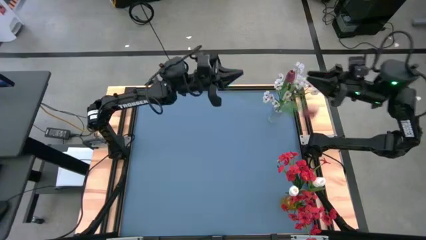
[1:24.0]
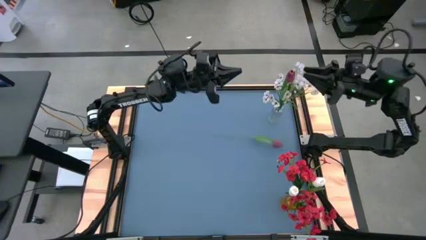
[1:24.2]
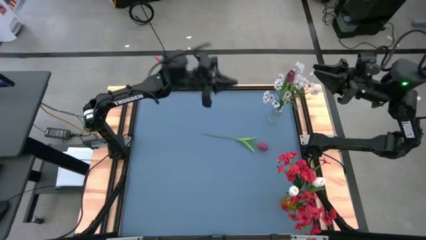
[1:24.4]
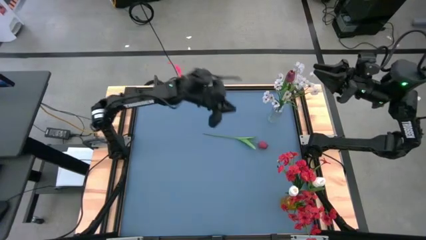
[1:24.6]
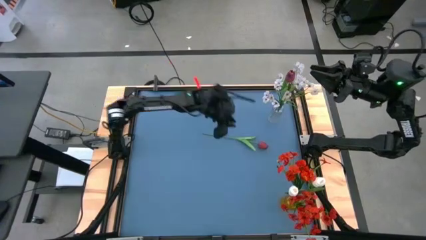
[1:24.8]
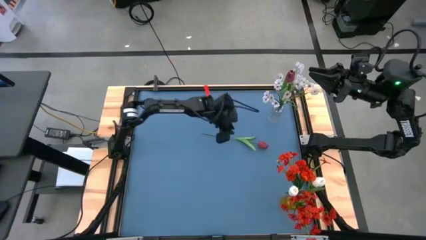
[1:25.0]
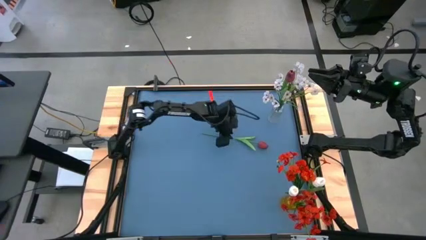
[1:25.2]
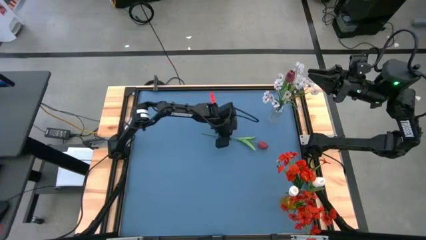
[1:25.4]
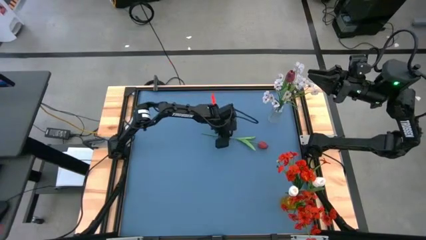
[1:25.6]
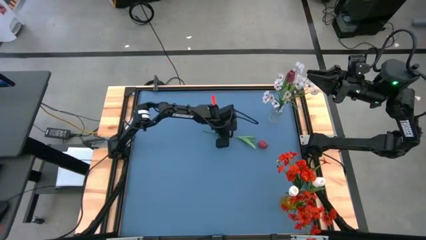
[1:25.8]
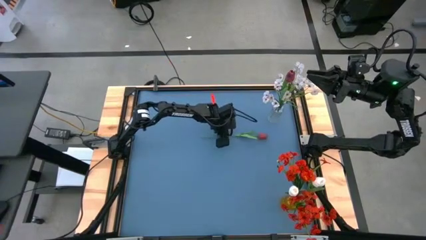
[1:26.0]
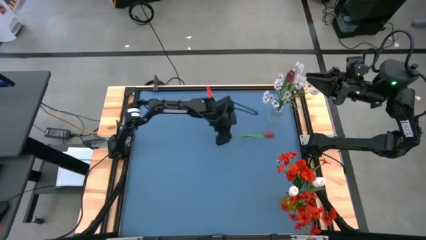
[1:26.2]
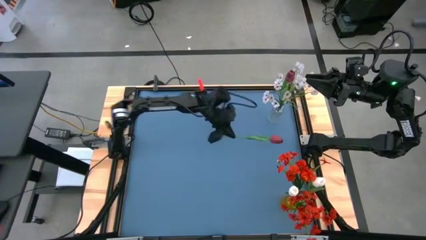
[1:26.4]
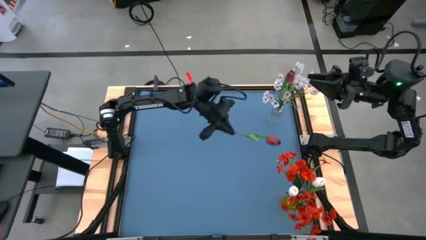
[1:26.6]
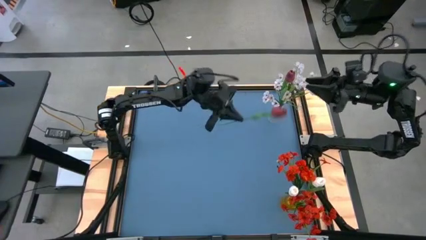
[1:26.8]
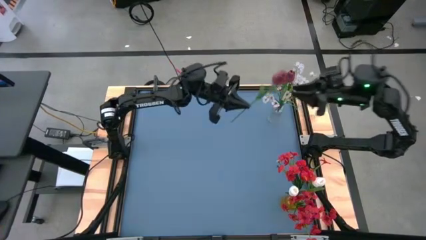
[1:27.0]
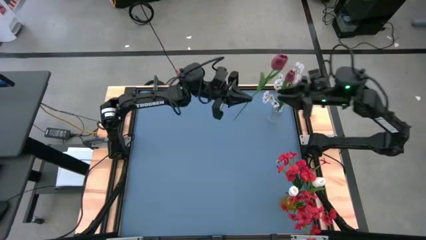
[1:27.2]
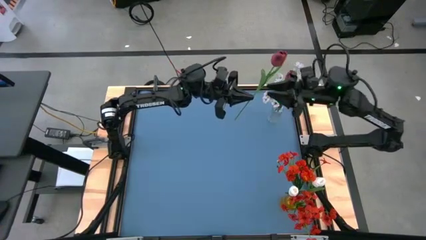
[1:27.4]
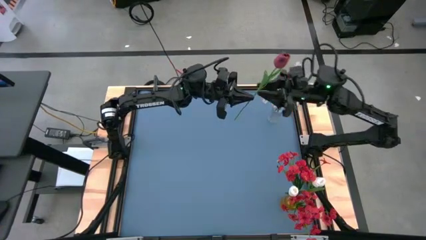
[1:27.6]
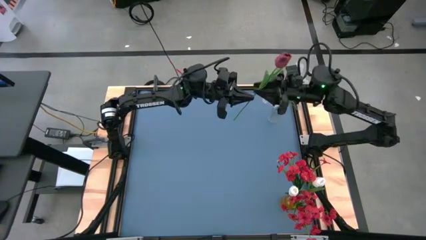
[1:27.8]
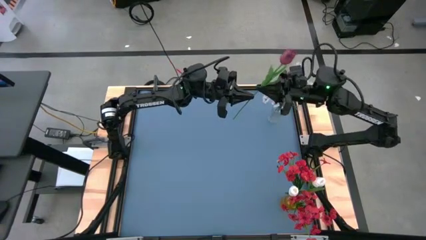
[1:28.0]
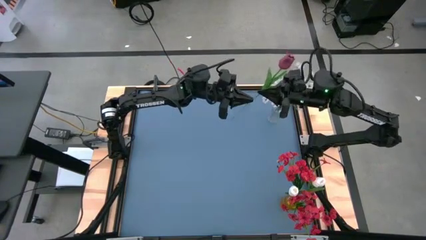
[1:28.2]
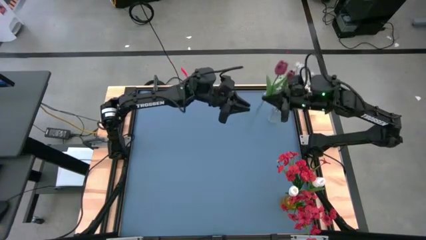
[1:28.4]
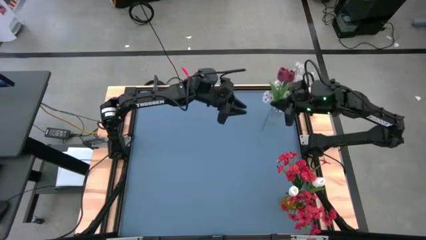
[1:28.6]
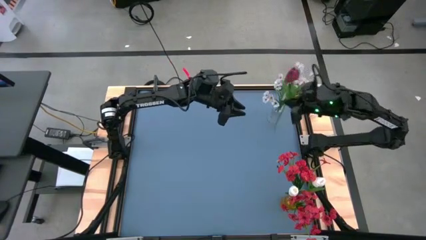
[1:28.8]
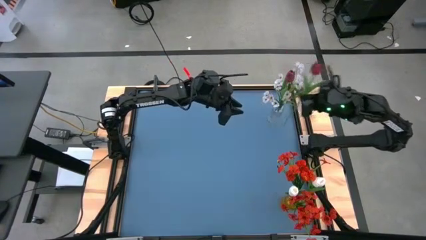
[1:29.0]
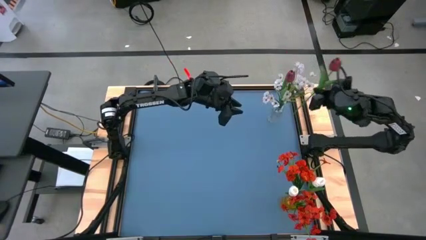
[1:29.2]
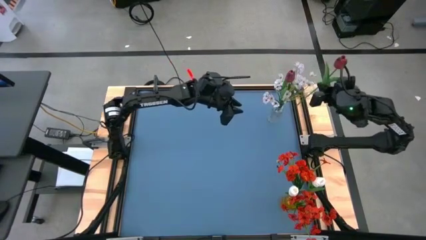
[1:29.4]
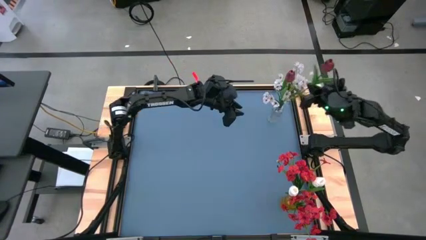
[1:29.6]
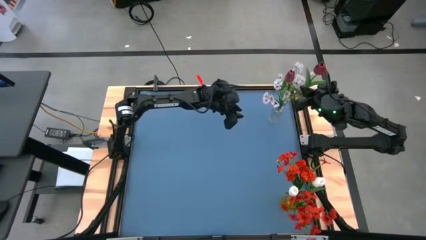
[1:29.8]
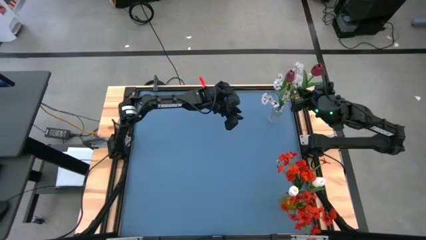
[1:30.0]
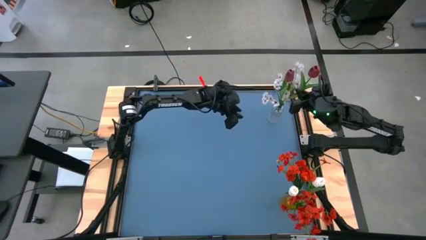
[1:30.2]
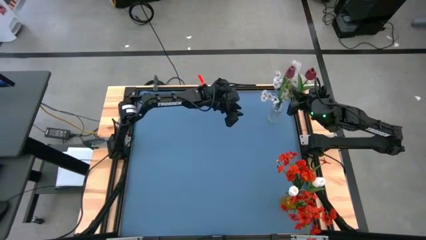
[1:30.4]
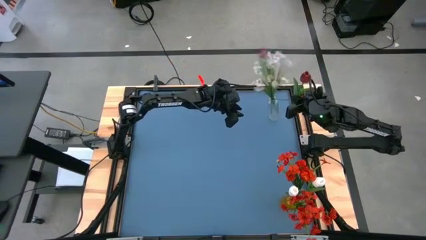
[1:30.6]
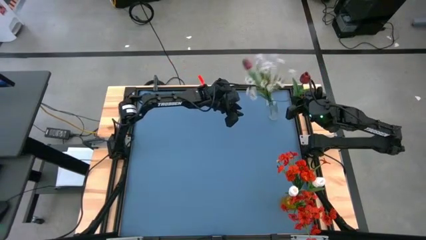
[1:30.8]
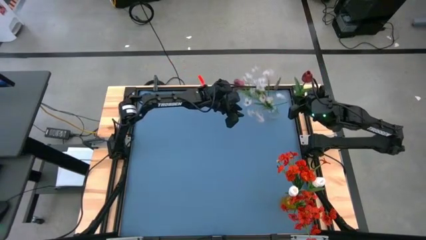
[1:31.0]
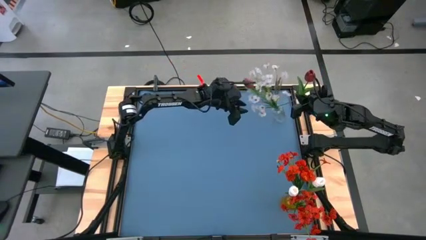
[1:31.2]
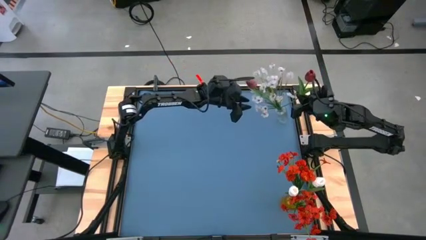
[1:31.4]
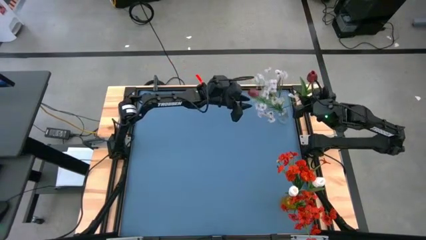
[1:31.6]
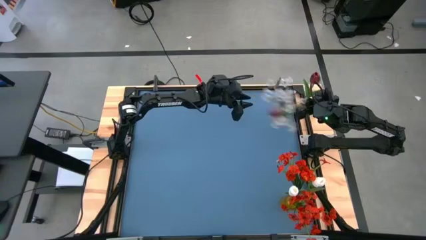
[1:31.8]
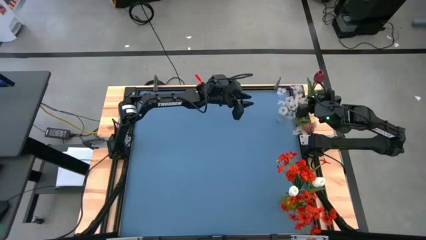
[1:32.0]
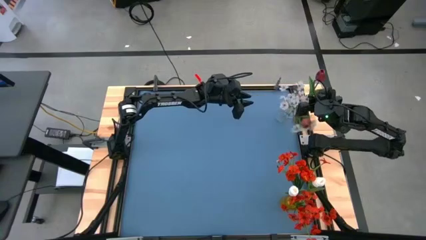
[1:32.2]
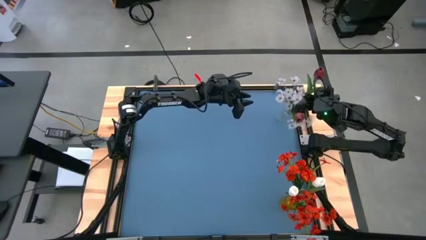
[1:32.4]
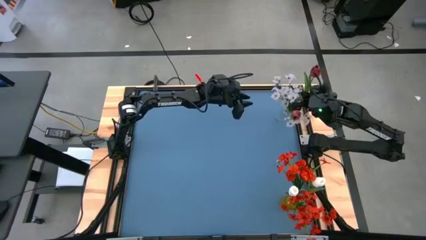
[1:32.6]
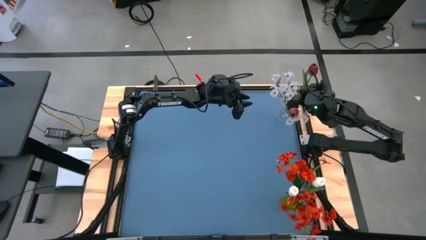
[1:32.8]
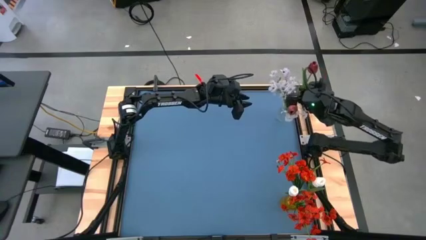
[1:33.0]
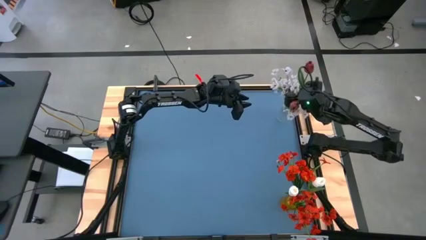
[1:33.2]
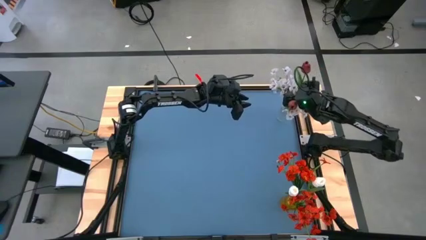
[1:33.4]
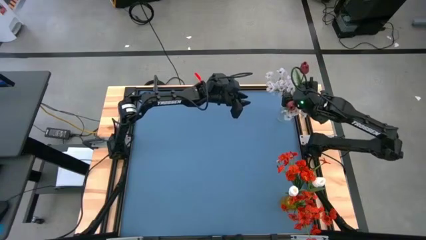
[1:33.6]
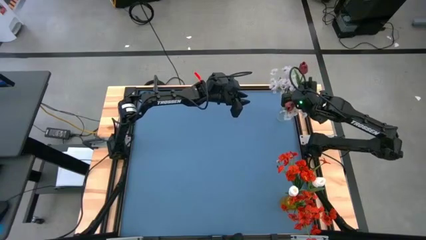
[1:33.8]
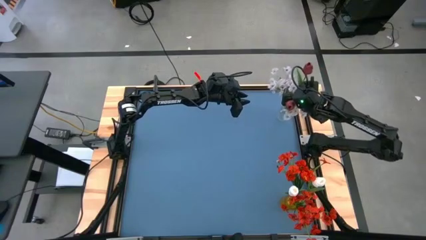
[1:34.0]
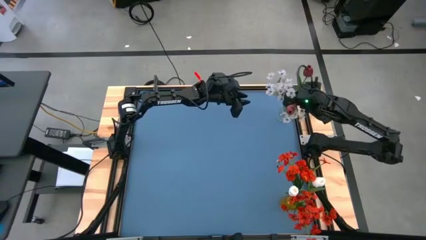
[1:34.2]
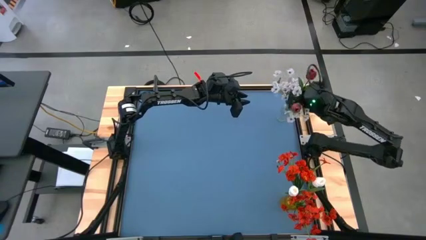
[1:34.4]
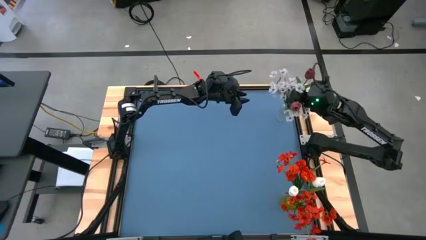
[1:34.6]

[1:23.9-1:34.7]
Task: Sort flowers into vase by color
Put the dark red flower into the transparent vase

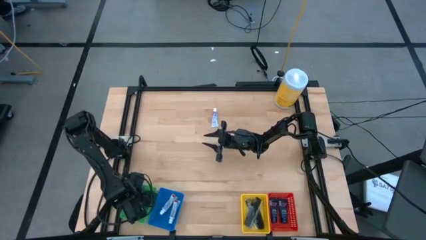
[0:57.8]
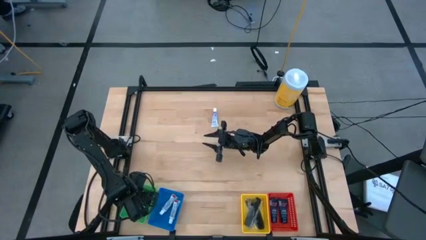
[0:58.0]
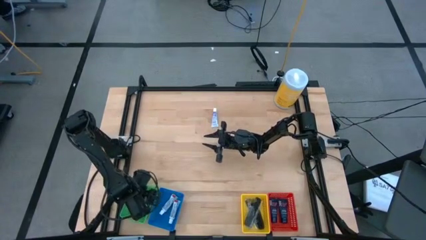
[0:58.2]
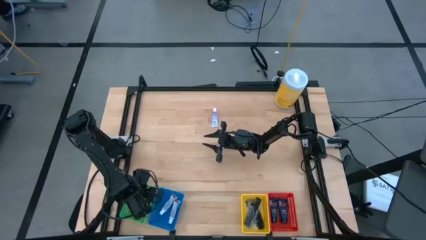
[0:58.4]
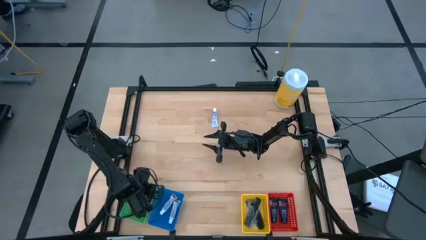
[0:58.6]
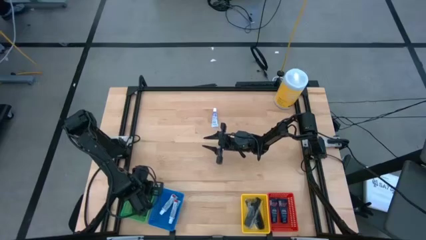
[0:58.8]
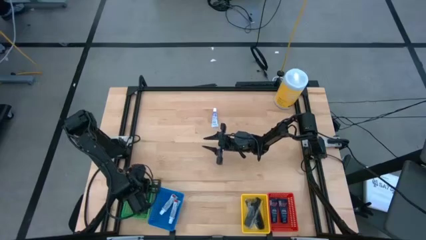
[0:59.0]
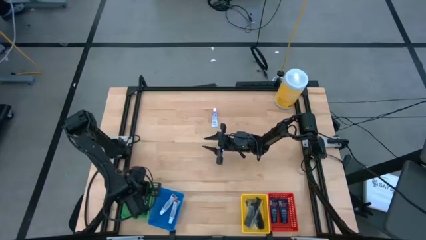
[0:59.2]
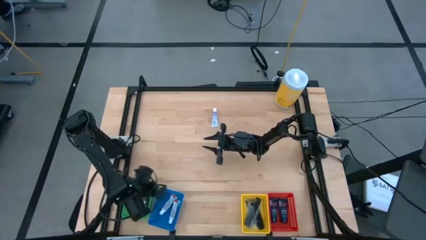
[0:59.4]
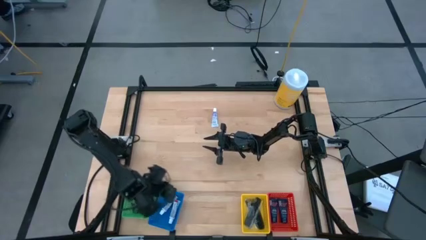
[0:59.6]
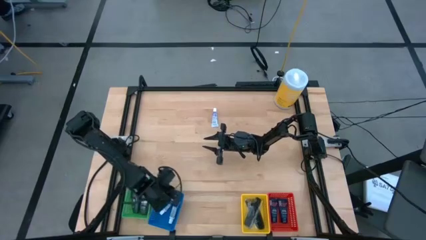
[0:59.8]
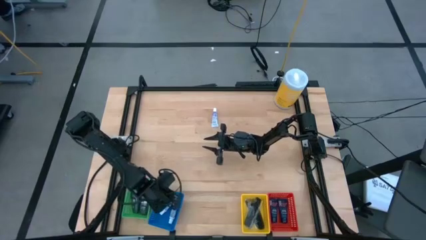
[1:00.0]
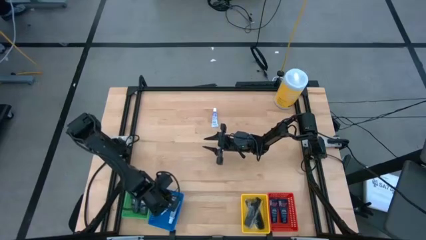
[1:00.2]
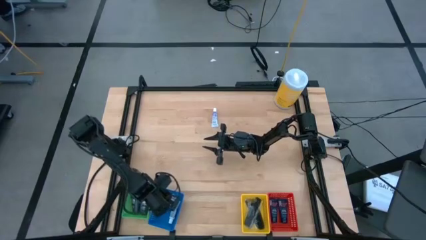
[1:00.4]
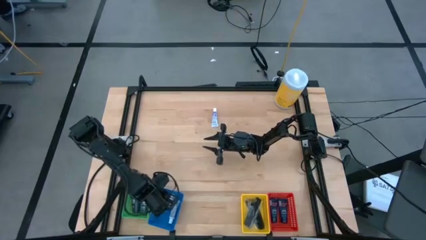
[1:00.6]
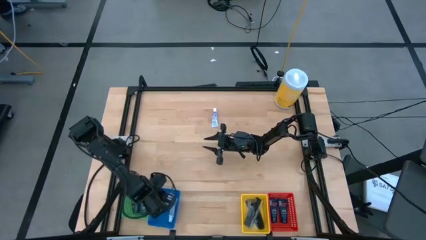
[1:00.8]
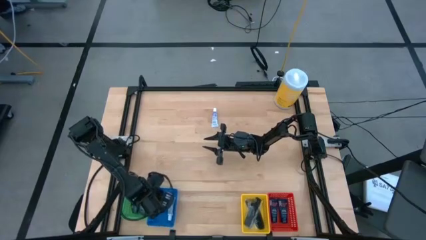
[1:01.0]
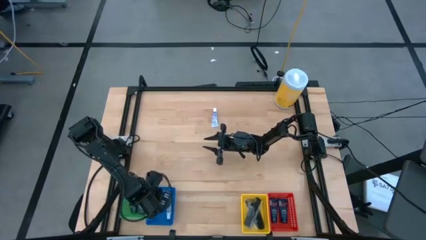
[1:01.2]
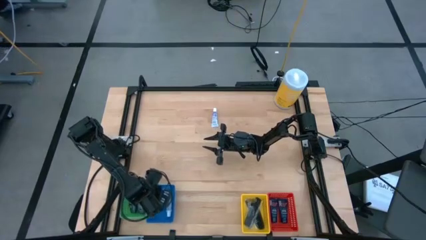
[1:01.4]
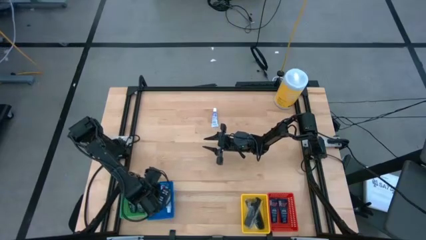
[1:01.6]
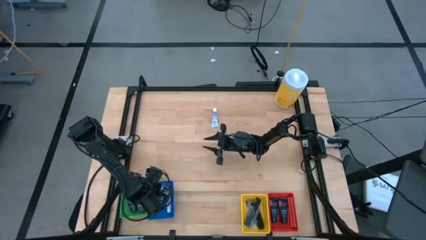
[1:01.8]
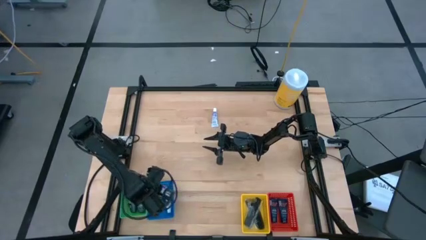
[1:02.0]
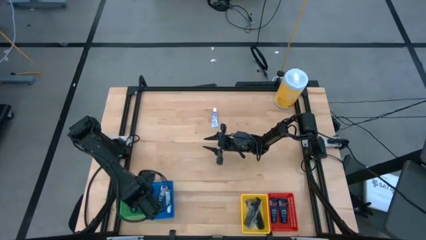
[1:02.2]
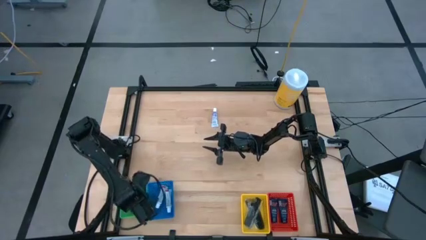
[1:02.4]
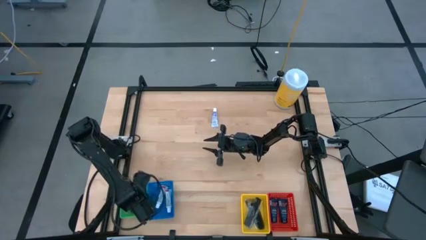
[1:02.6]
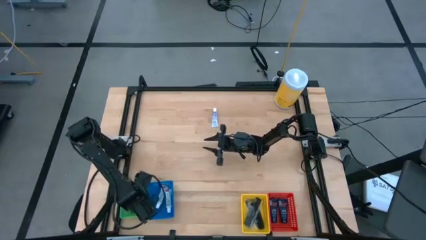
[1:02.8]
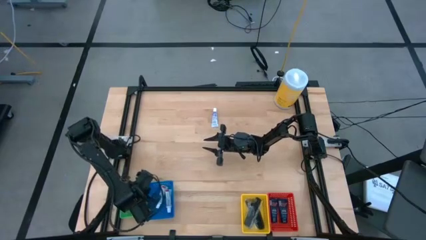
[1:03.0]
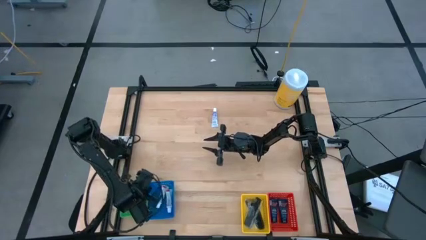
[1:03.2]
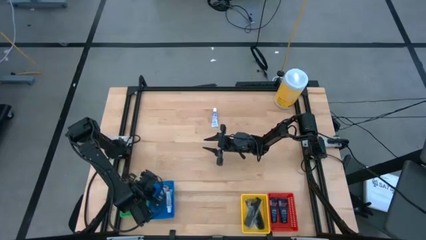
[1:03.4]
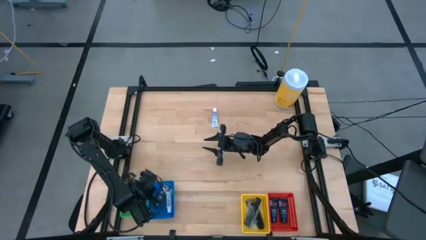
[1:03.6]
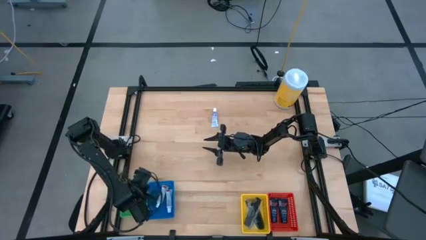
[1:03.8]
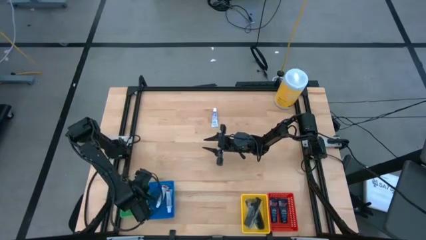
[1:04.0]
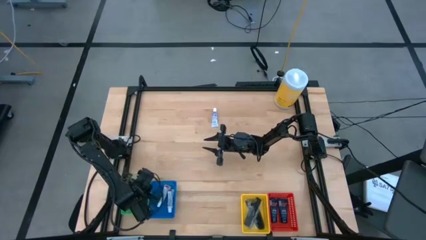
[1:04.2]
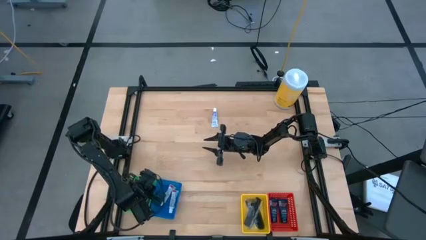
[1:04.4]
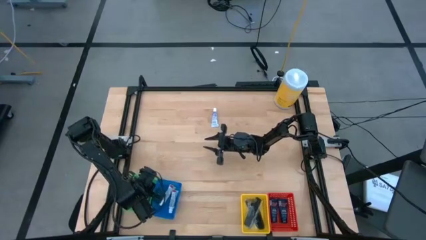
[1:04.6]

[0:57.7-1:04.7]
Task: Pick & Place Travel size toiletries
Adjust the blue bin and the green bin on the table
